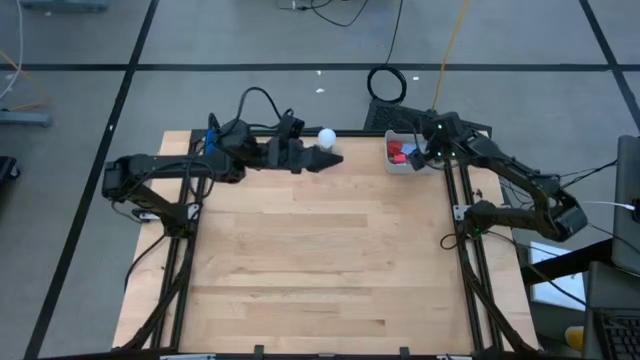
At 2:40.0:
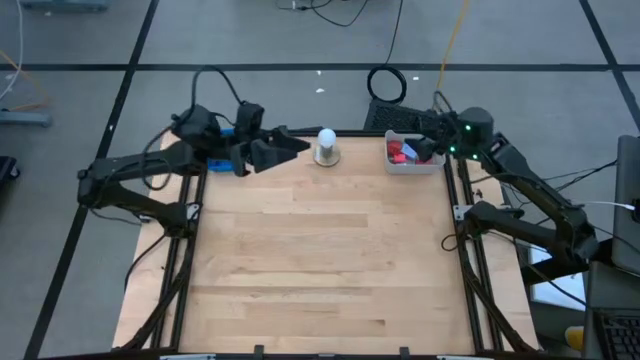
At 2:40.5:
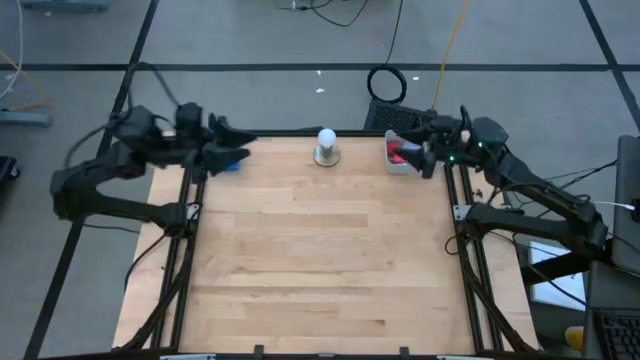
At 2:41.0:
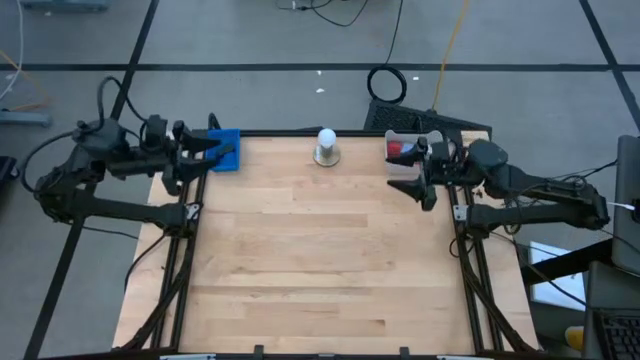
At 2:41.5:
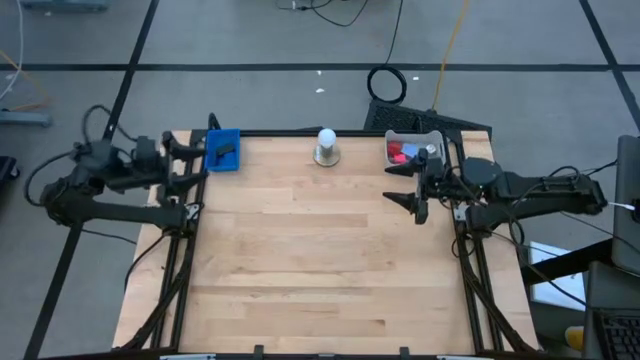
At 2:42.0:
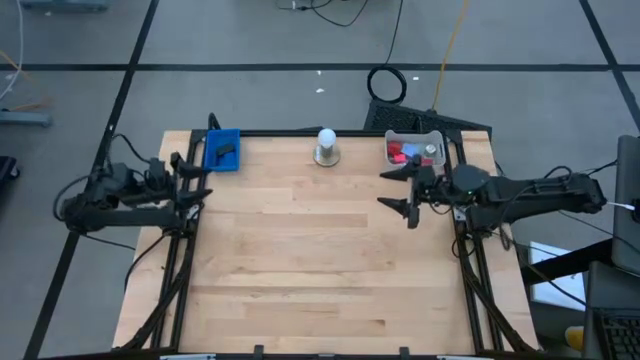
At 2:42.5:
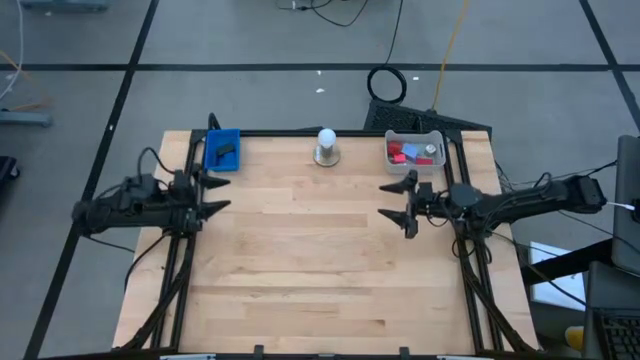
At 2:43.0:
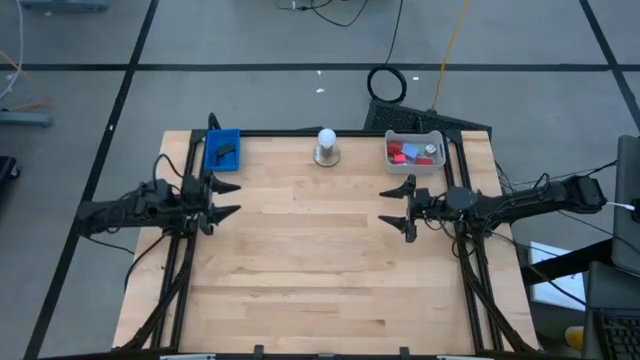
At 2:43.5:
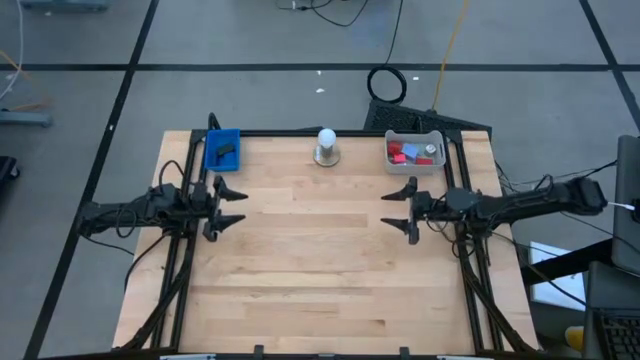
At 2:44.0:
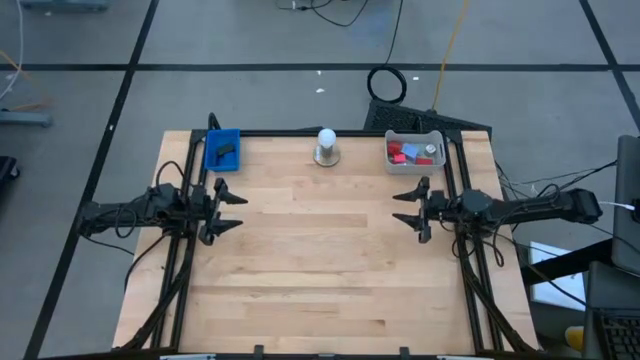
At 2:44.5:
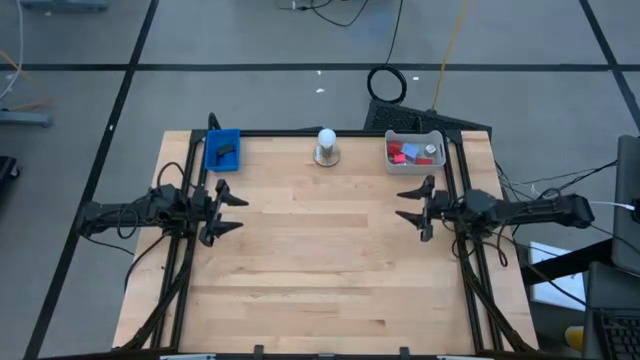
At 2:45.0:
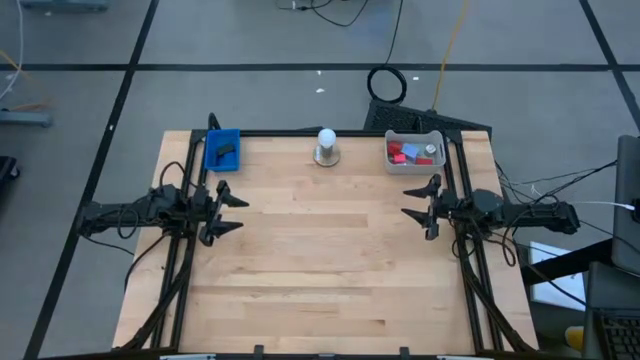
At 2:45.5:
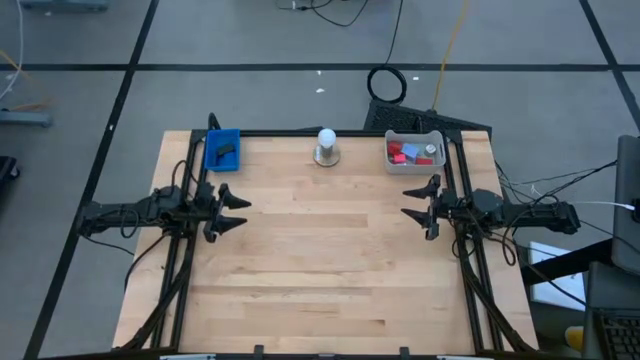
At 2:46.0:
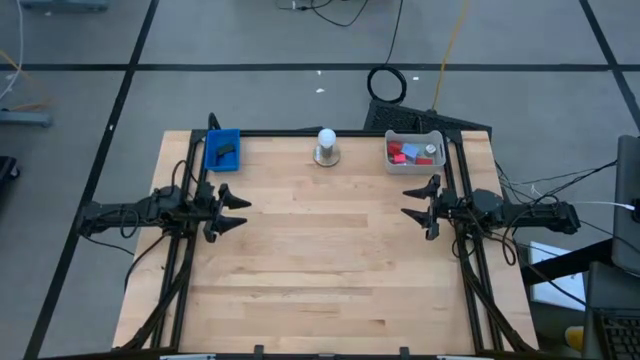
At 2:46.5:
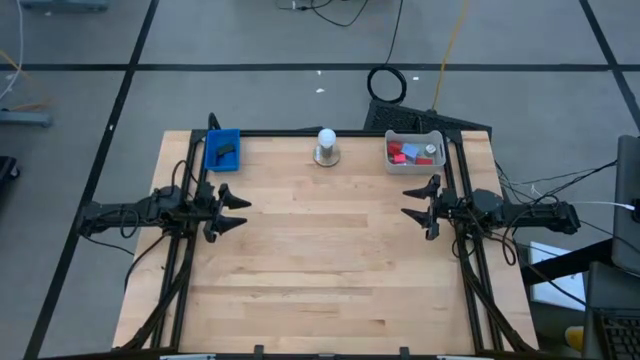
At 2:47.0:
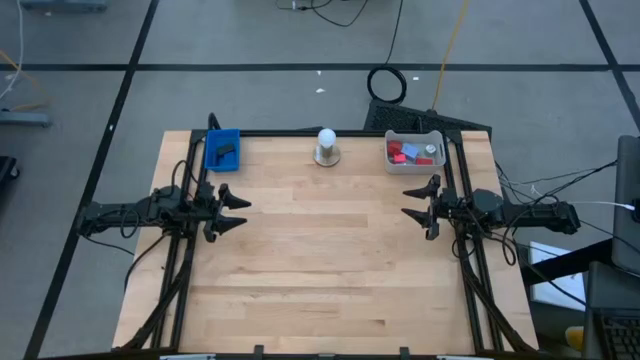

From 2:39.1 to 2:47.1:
Task: Pick & Place Office items
Return to Home Position

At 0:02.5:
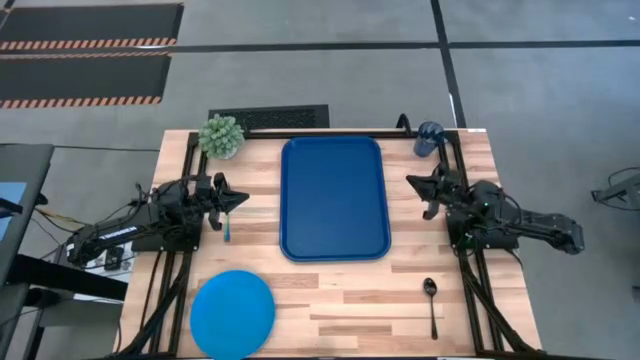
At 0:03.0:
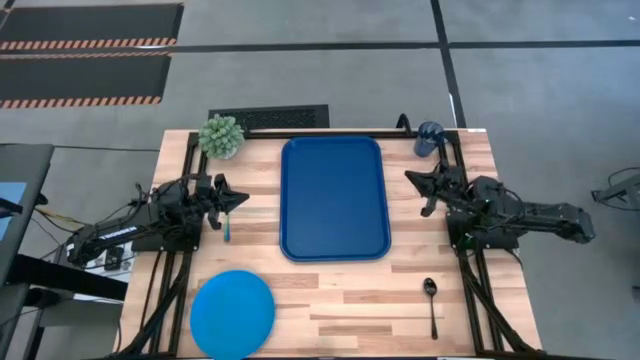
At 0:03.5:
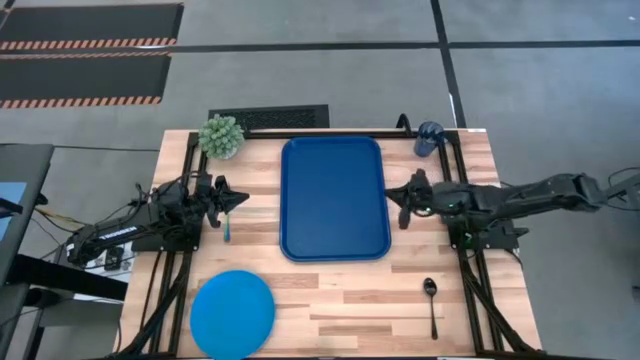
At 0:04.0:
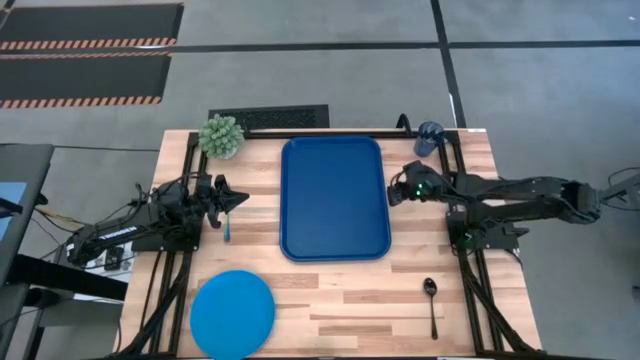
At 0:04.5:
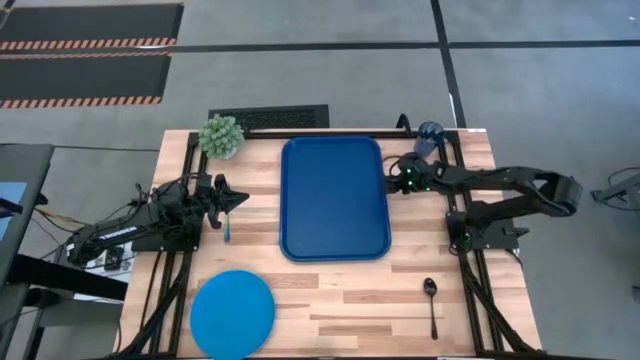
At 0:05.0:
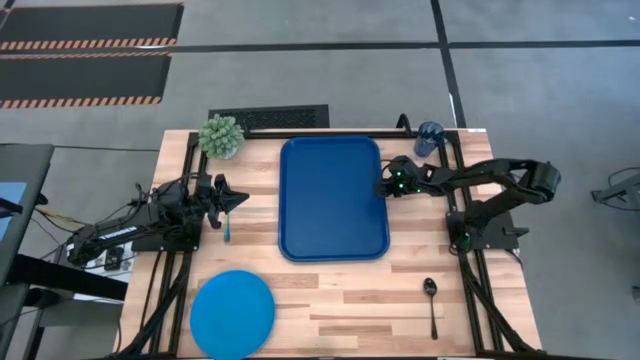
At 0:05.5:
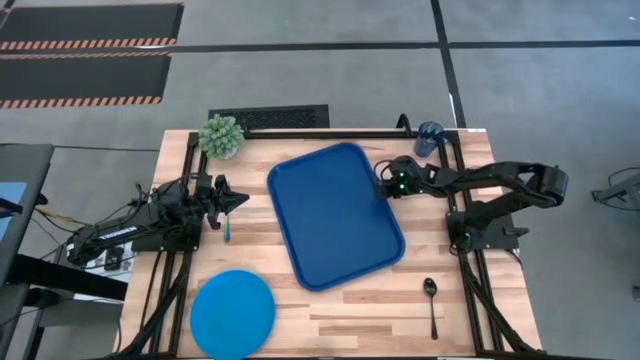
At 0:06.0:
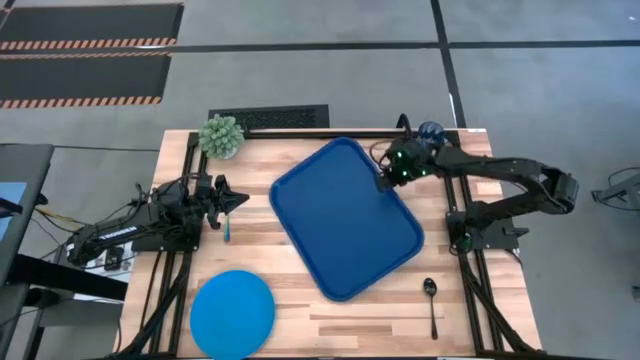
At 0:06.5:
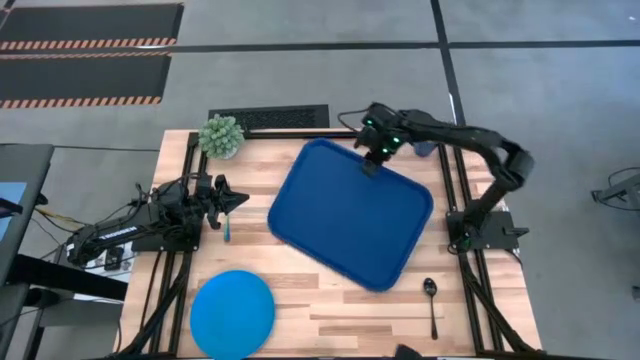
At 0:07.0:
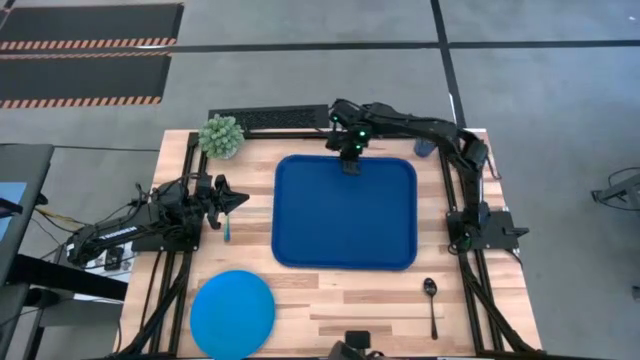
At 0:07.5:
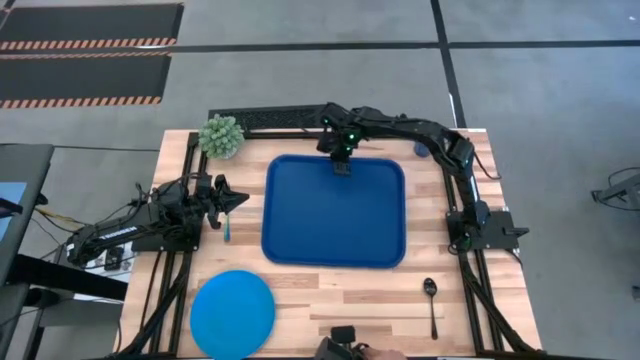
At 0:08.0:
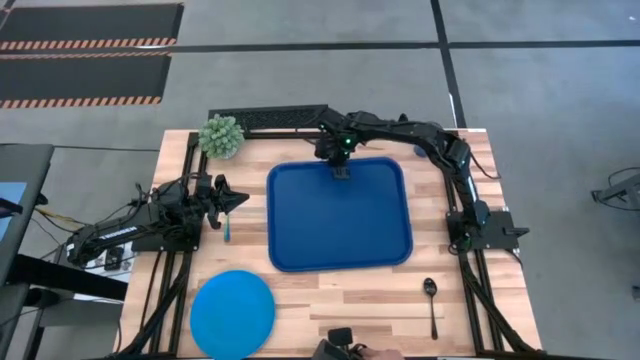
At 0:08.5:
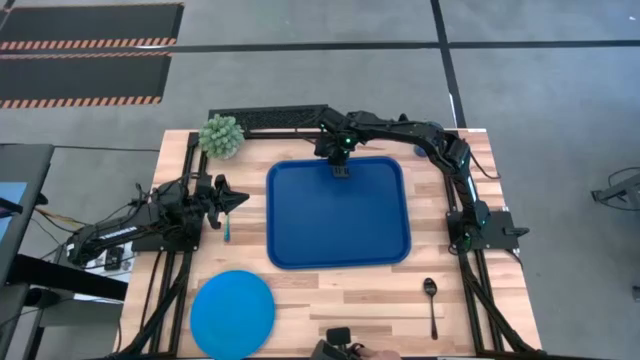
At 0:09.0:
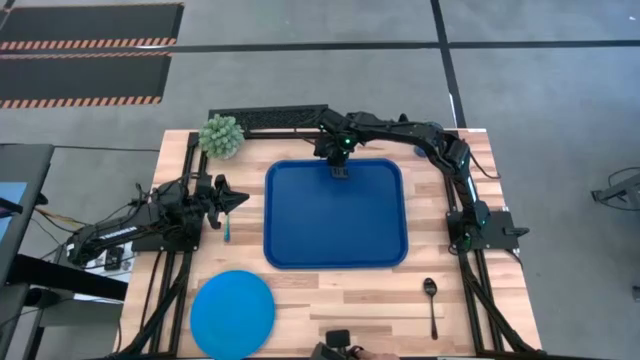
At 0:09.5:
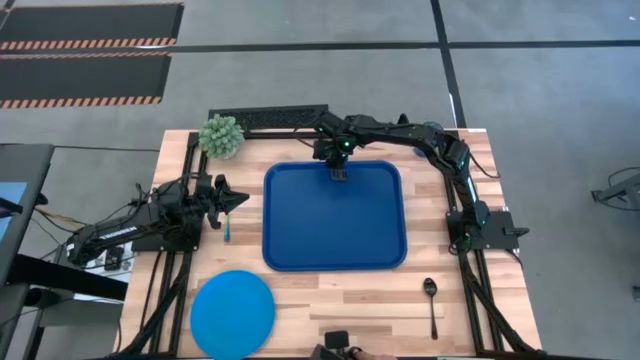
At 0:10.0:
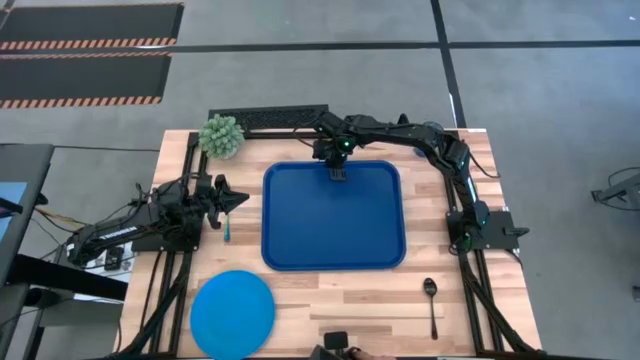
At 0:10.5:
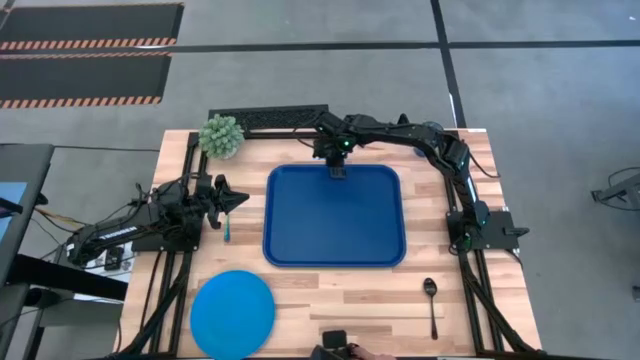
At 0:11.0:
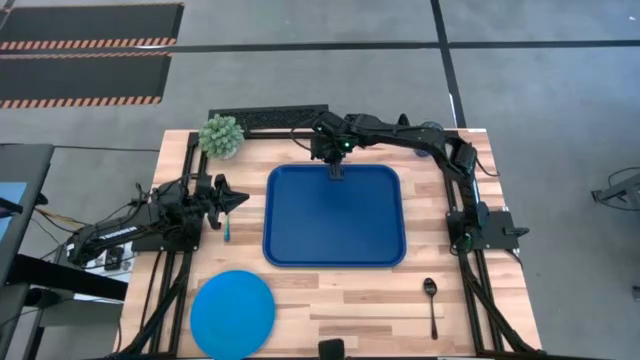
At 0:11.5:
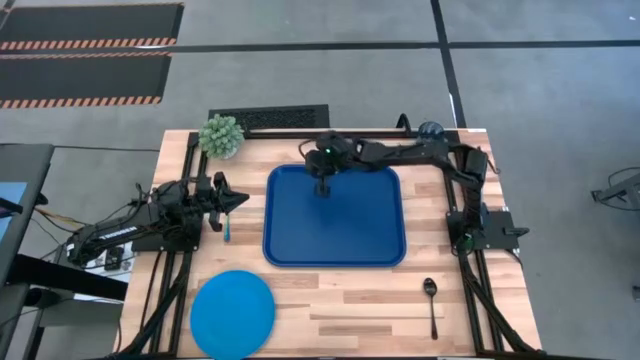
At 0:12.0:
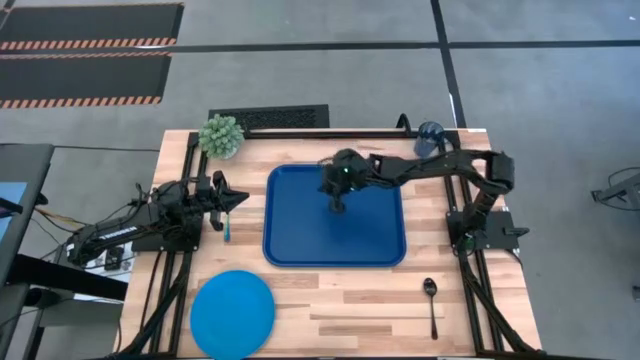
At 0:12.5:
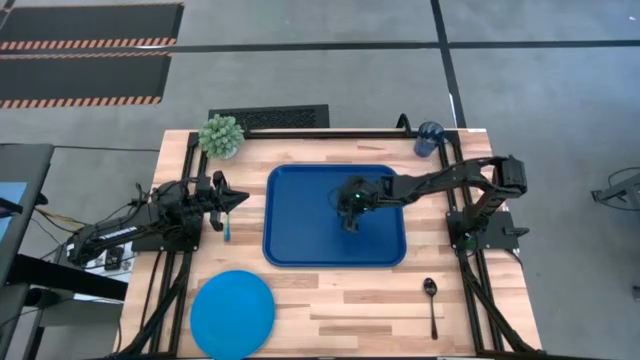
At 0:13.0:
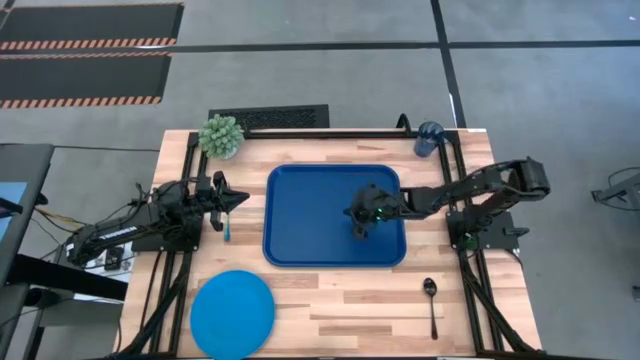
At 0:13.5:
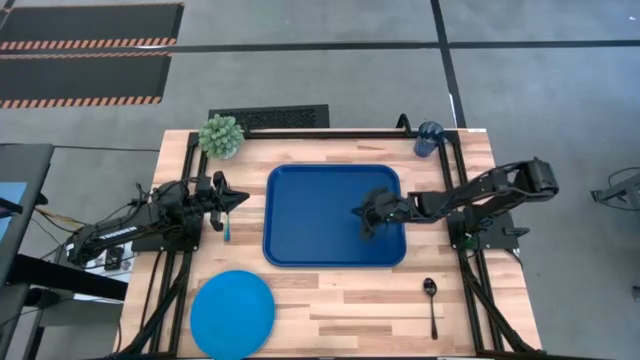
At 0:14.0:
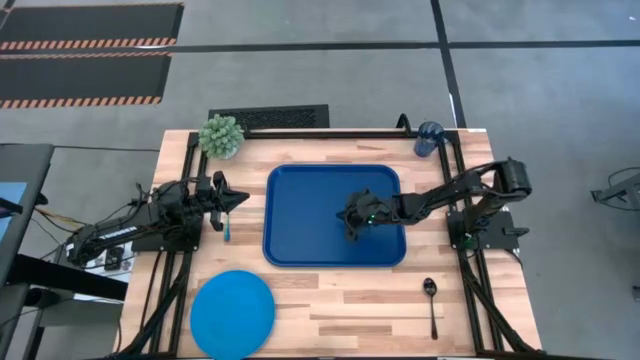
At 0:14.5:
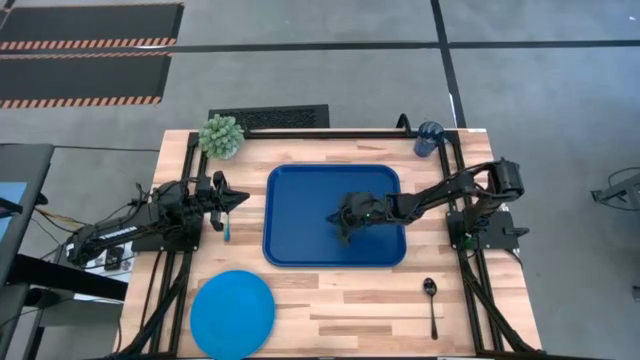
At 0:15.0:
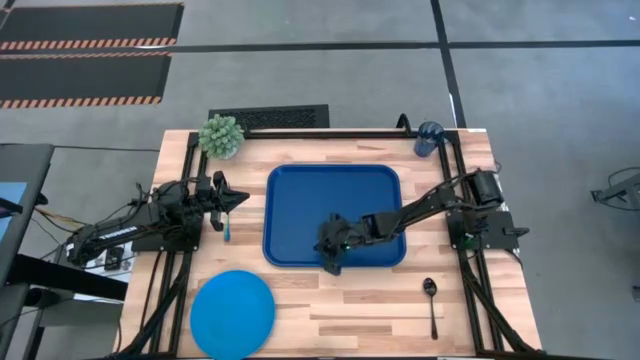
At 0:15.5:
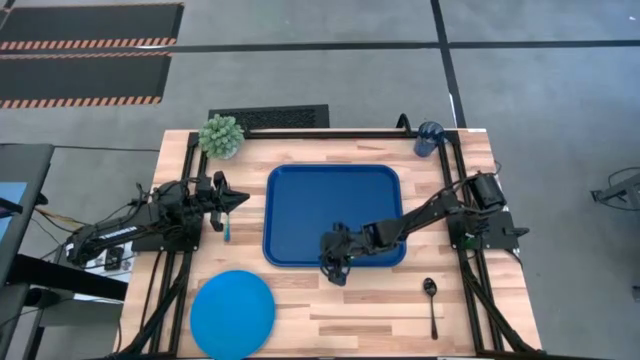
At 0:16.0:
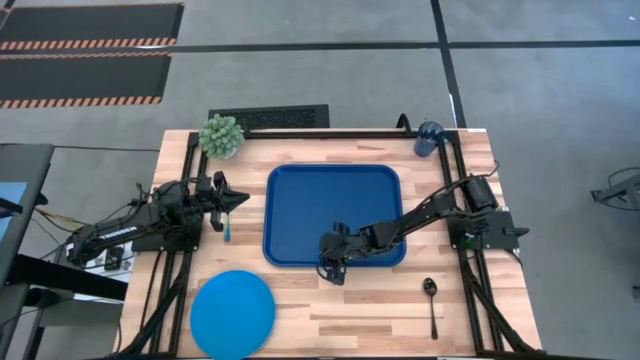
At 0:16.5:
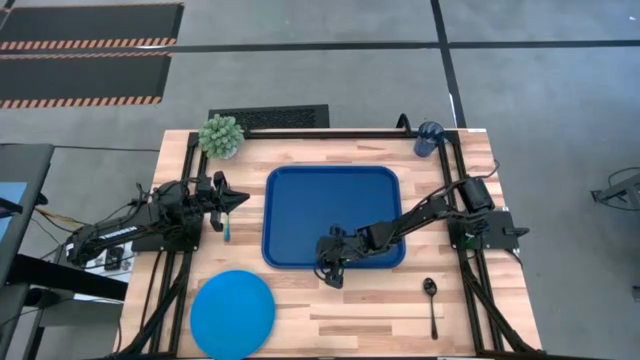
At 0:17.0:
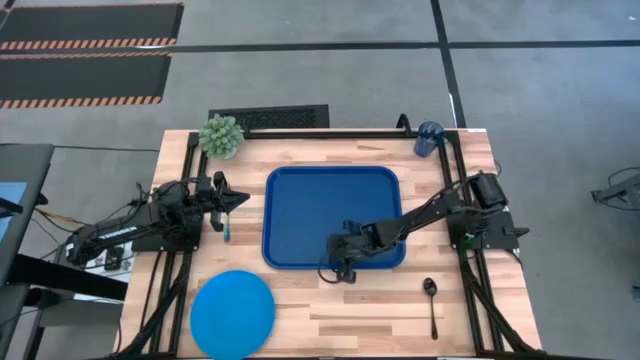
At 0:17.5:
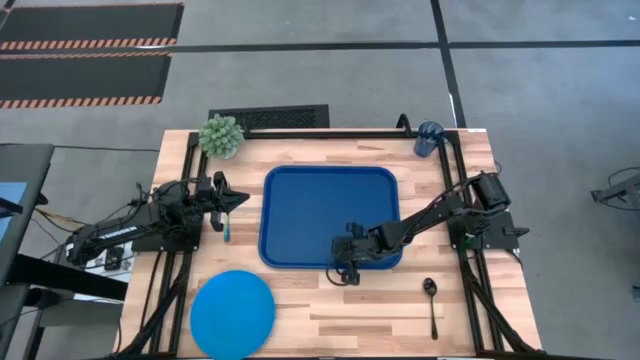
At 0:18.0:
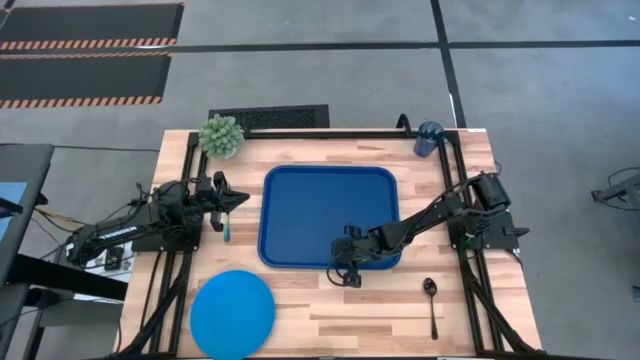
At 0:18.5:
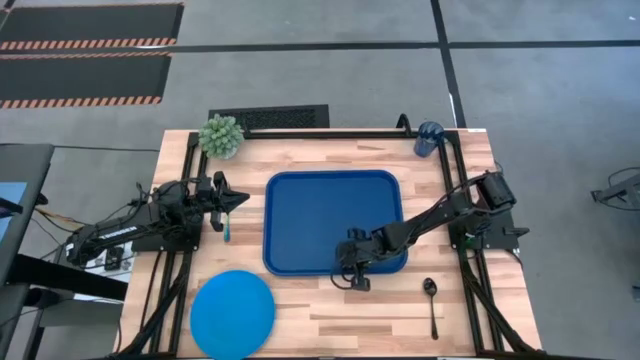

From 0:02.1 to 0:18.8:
Task: Pick and place plate/cup/fork/spoon on tray
Adjust the blue tray on the table
